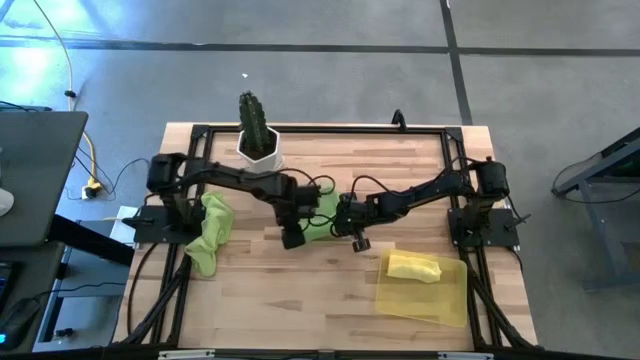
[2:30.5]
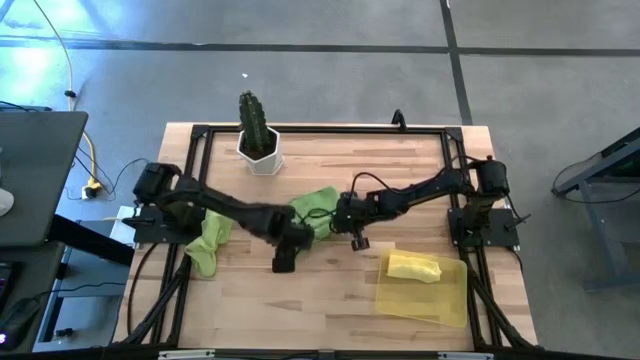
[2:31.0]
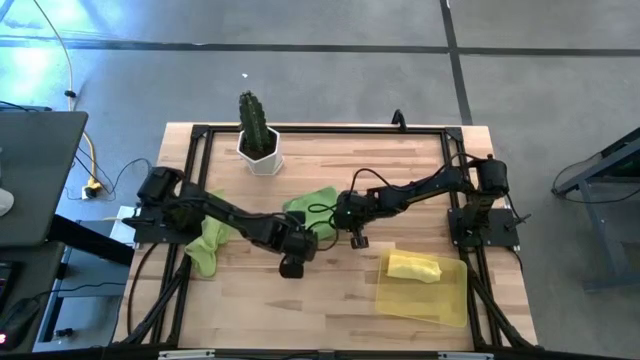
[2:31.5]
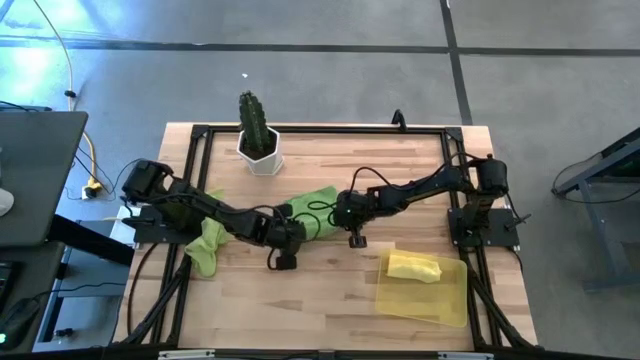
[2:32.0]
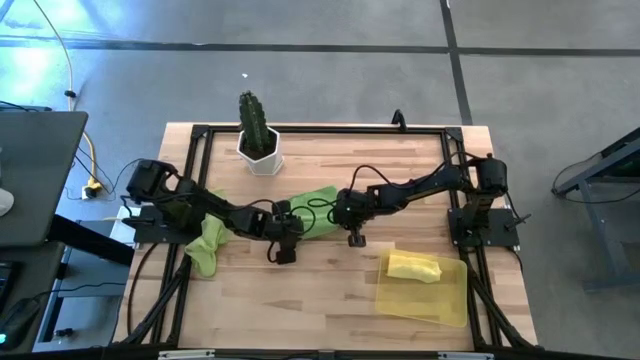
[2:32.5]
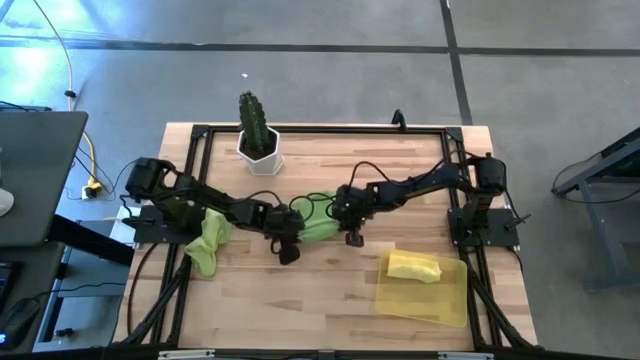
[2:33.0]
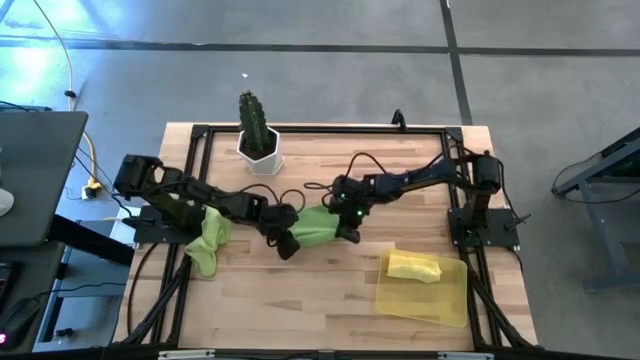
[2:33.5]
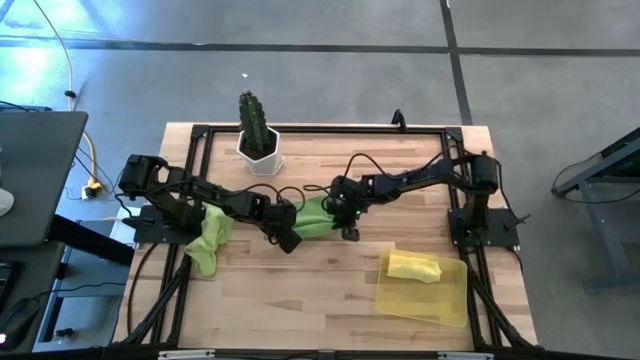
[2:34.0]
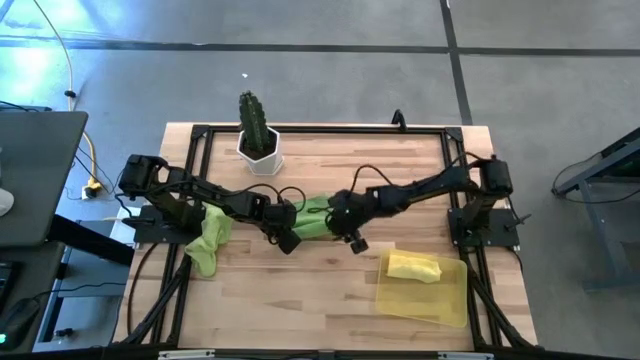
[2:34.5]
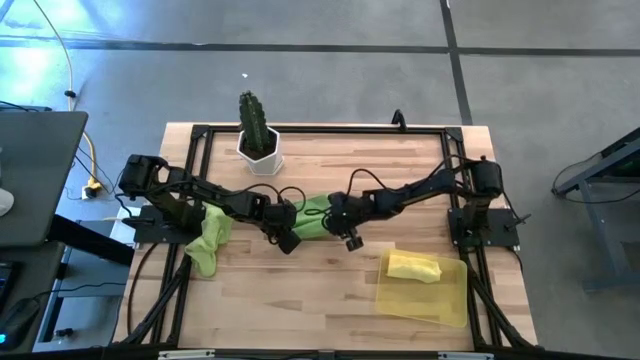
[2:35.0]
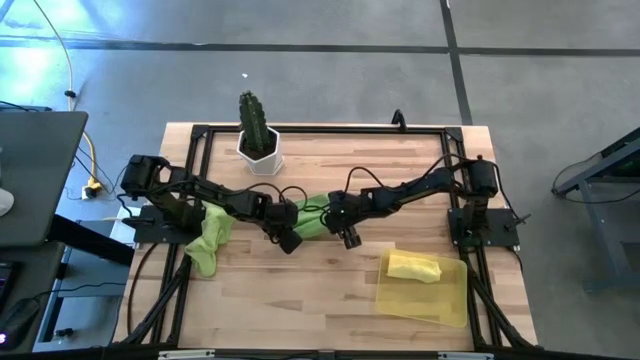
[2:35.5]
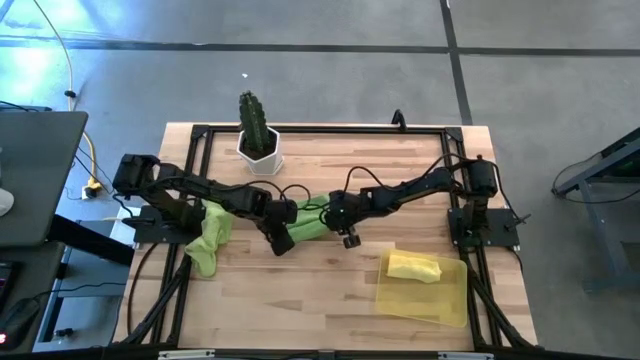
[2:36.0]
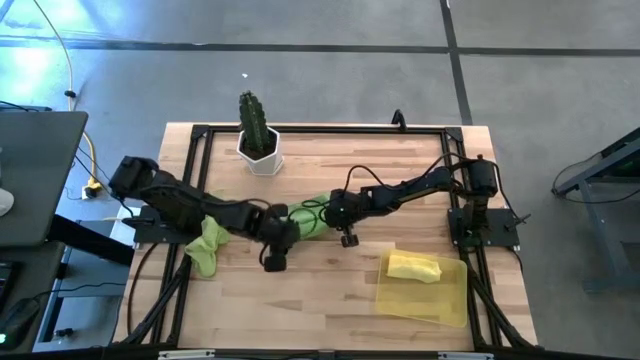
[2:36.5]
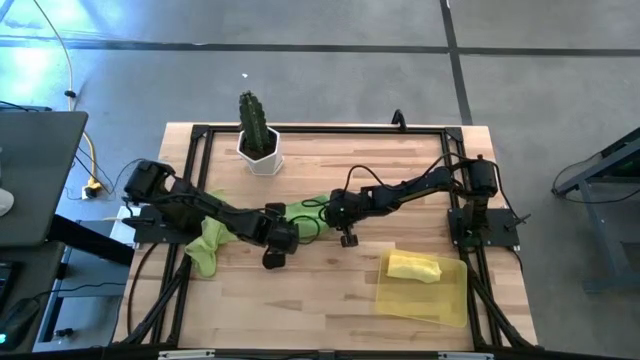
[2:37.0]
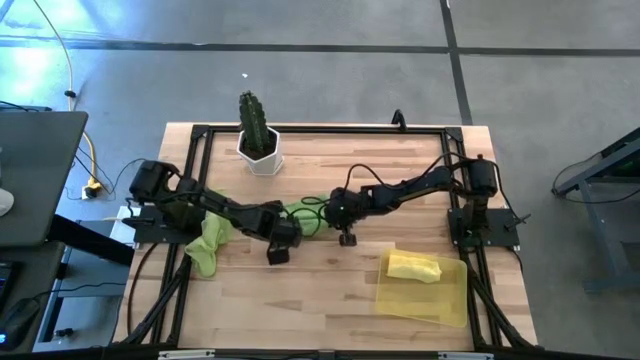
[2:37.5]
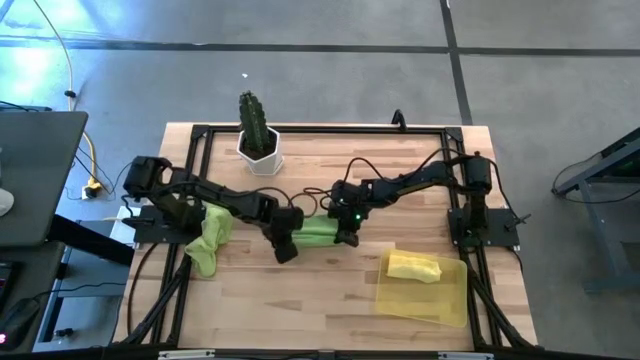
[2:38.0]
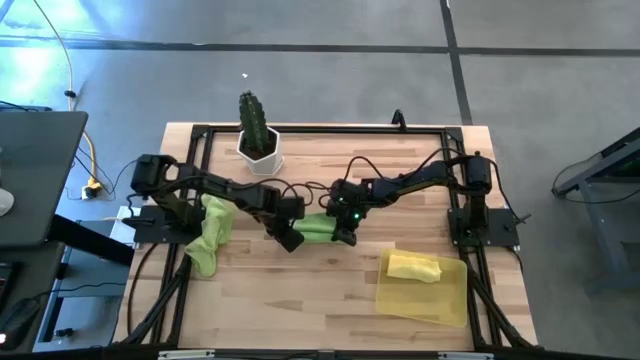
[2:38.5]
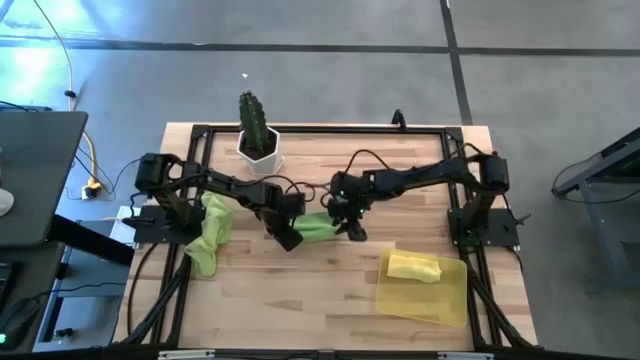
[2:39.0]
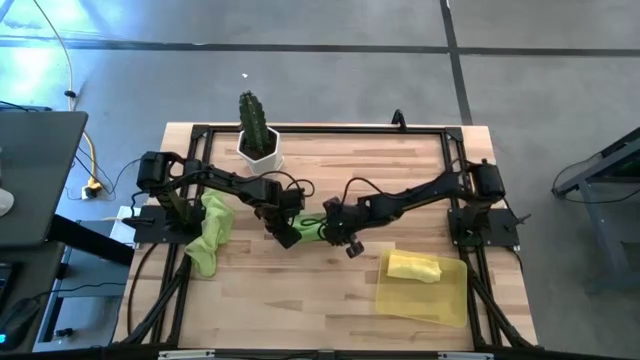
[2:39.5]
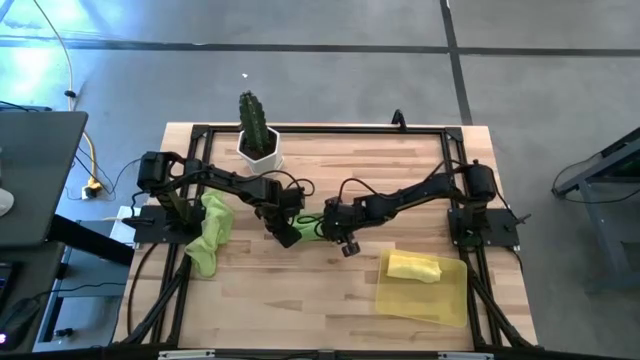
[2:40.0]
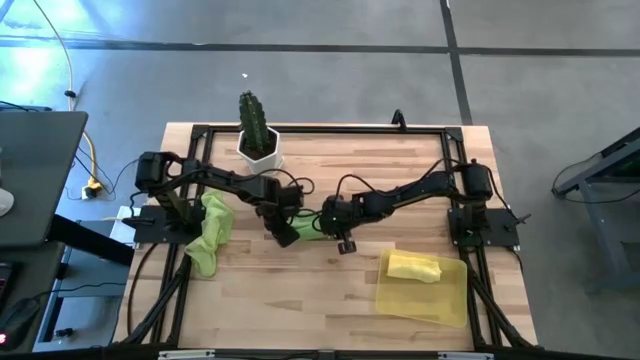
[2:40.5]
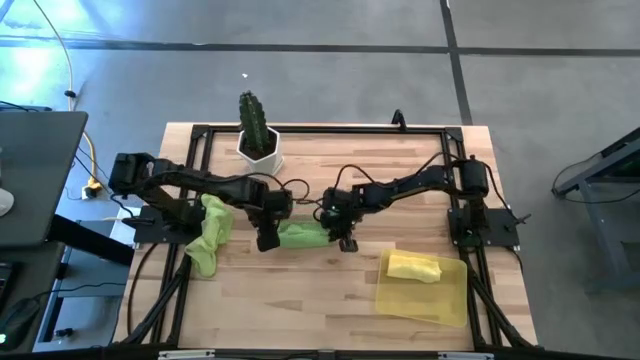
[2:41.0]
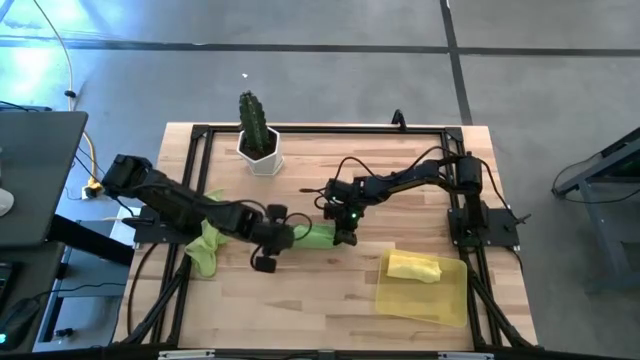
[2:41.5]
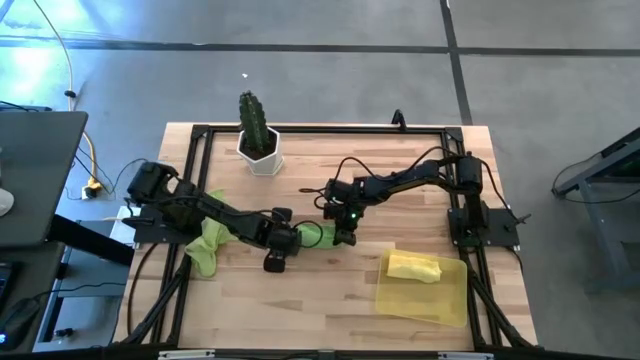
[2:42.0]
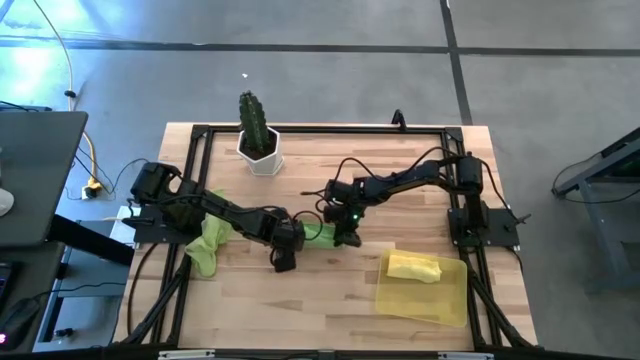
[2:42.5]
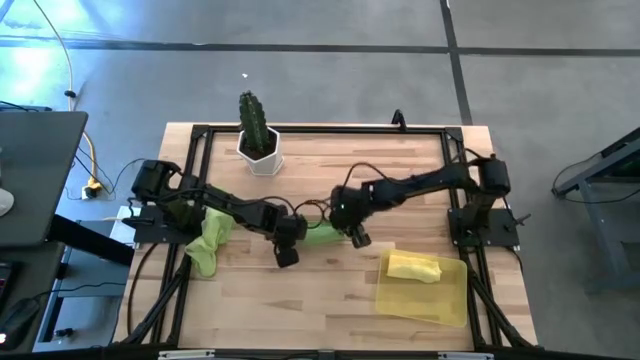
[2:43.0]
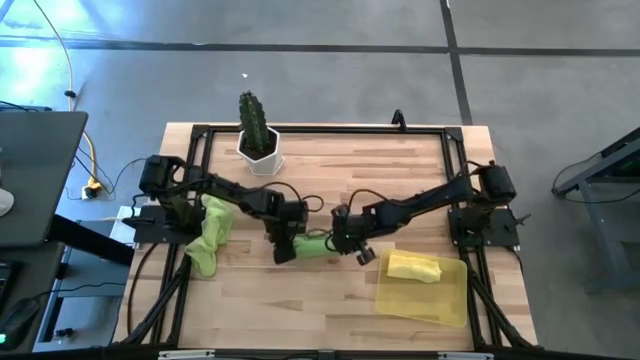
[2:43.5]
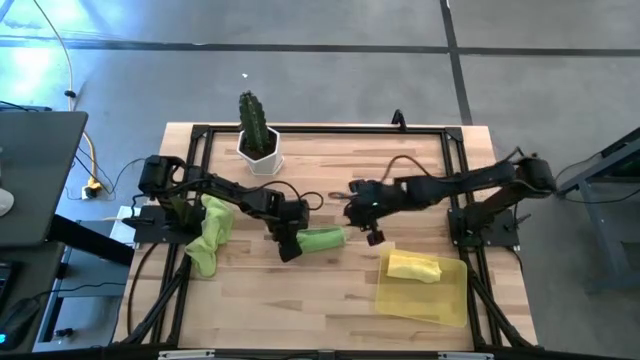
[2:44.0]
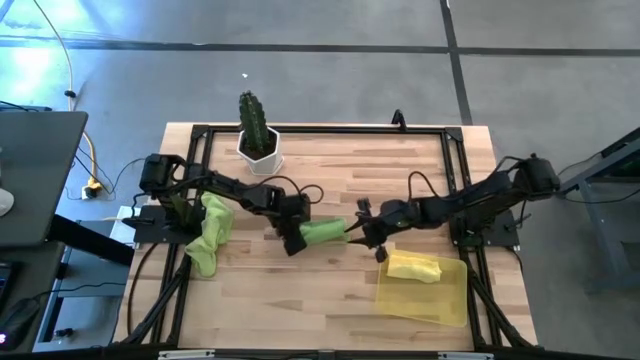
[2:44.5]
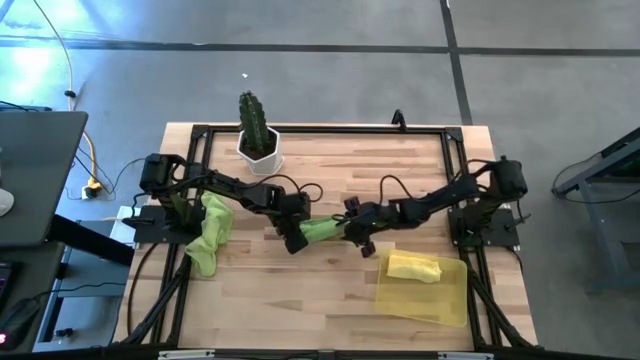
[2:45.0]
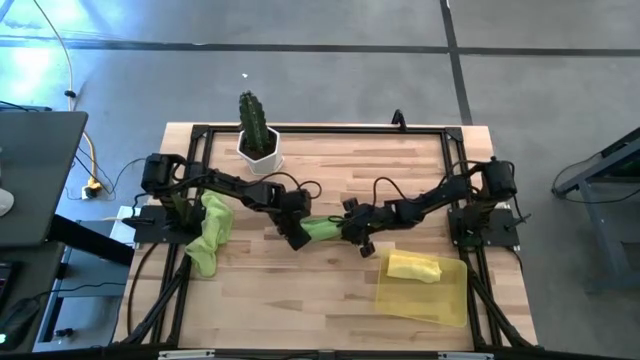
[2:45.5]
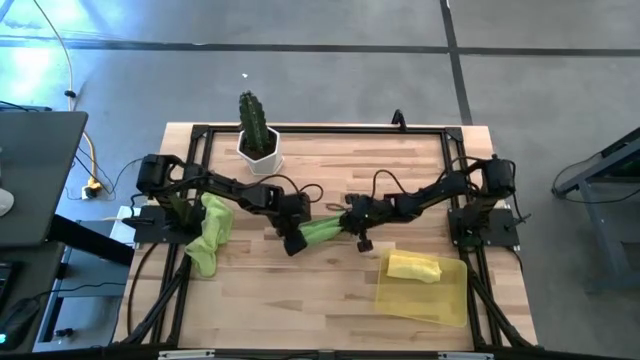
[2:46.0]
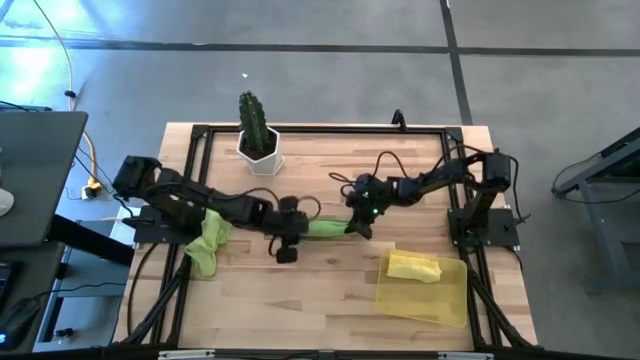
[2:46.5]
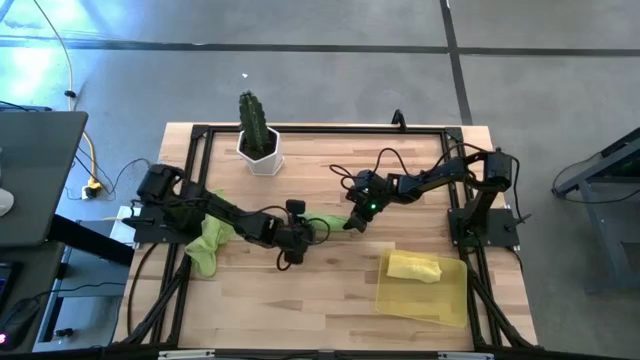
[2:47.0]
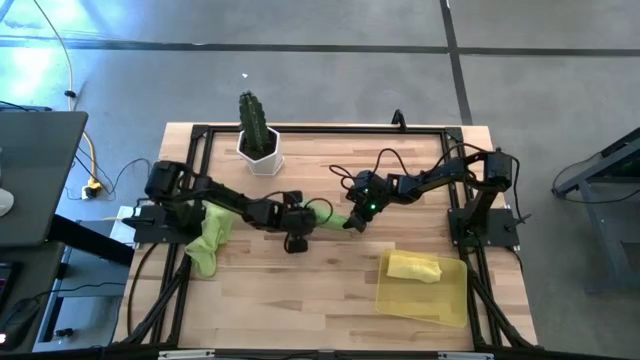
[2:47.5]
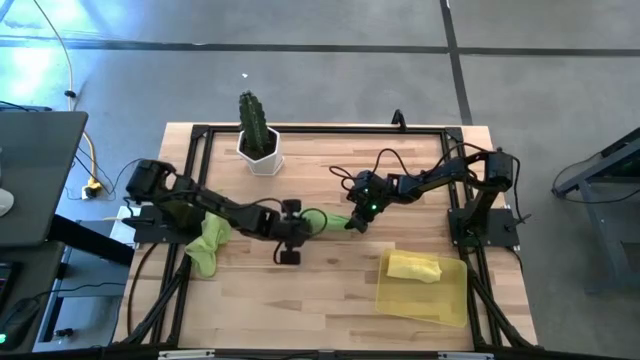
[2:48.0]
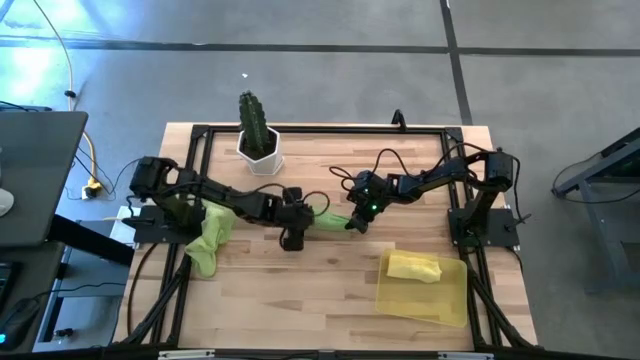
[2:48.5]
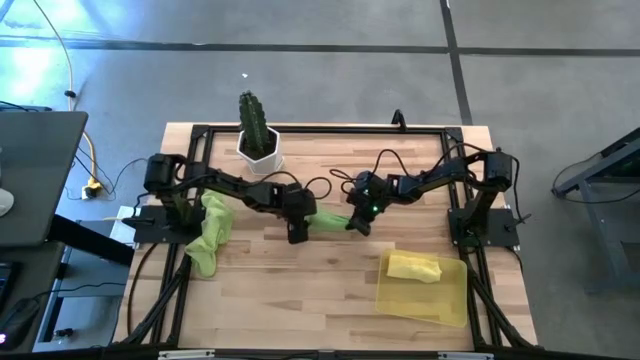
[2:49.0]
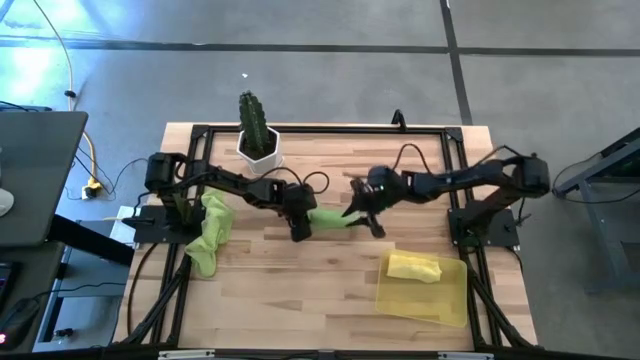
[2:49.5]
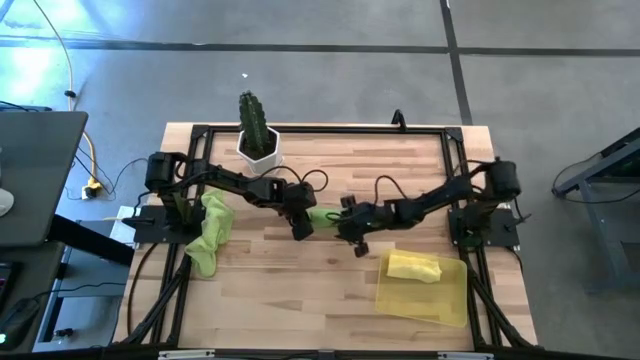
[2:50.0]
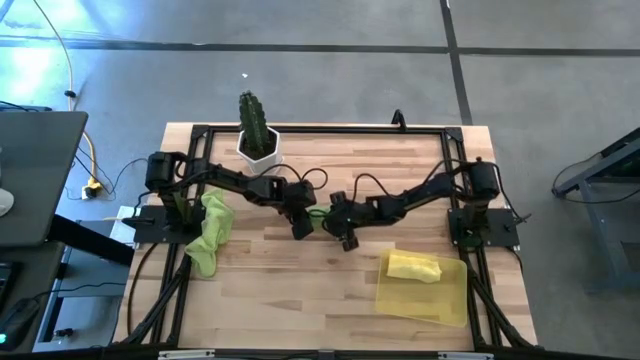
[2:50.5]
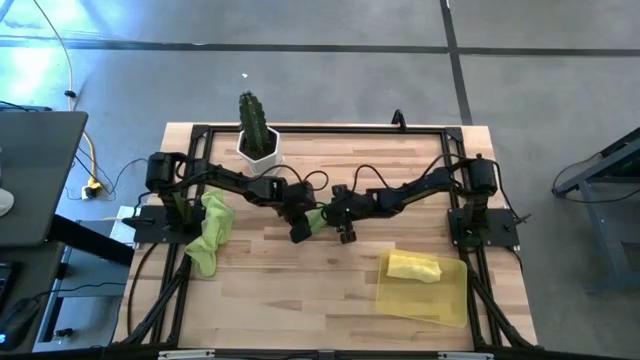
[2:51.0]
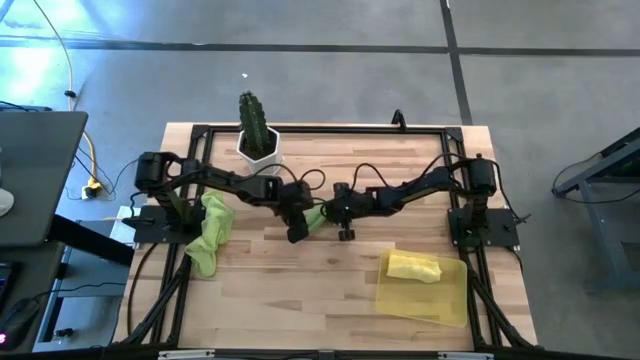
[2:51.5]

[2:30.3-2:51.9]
Task: Roll microfiber towels into tight, uniform cylinder then place into a basket
Roll the green towel

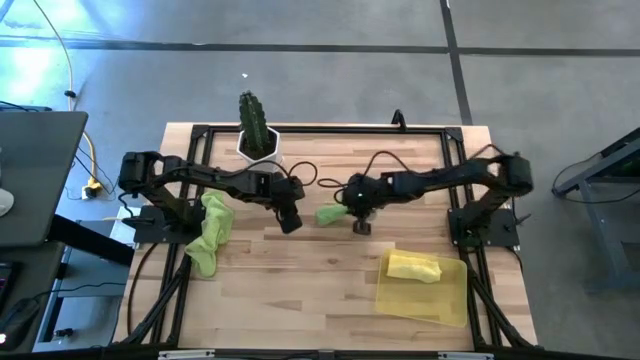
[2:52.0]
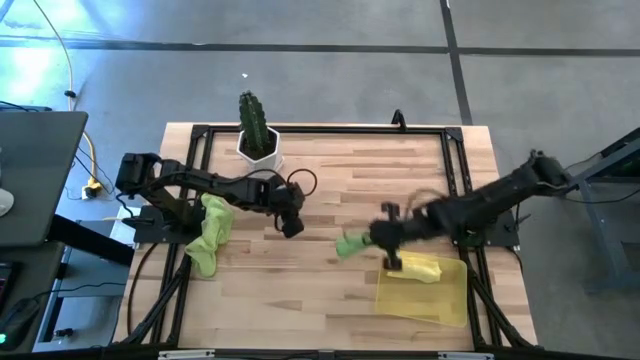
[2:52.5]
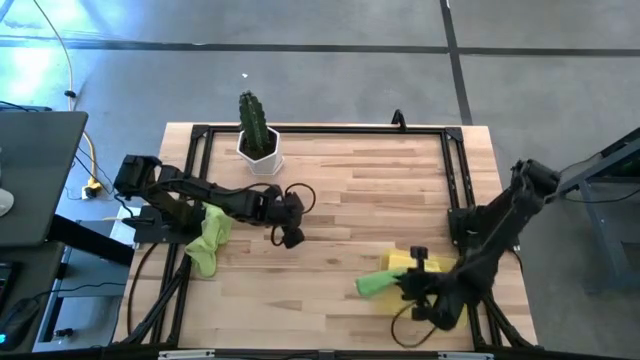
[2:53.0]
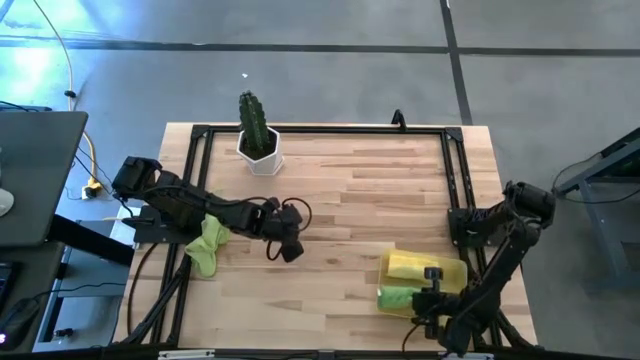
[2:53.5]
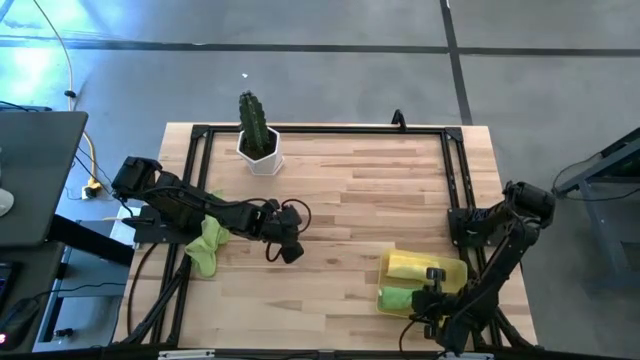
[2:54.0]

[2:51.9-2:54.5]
Put the rolled green towel into the yellow bin
